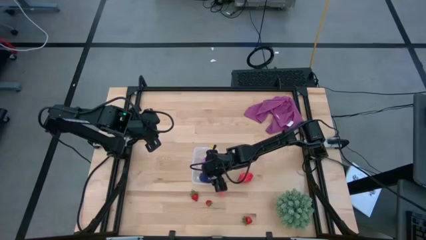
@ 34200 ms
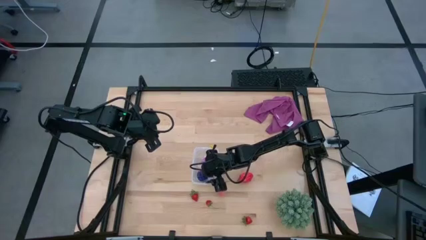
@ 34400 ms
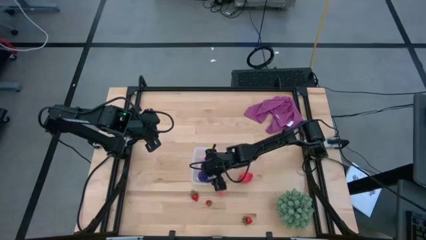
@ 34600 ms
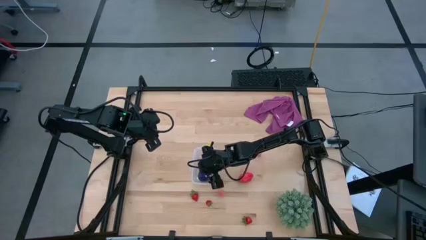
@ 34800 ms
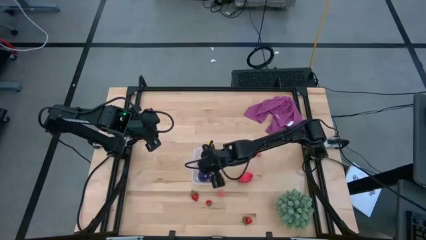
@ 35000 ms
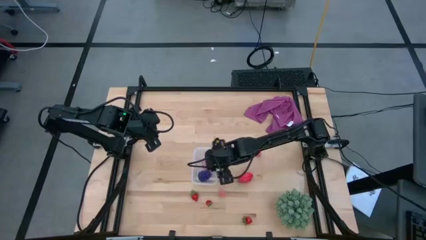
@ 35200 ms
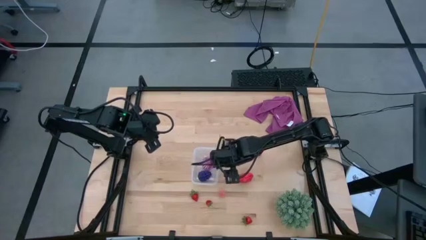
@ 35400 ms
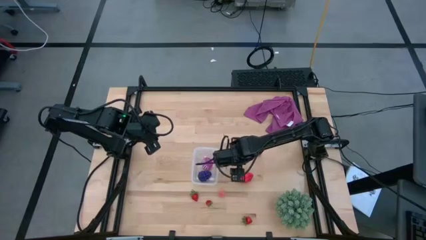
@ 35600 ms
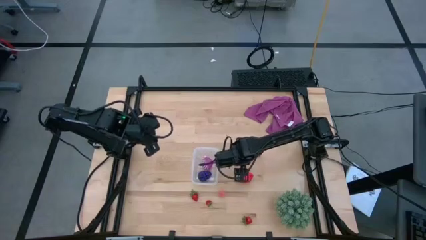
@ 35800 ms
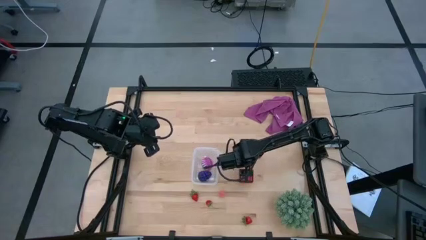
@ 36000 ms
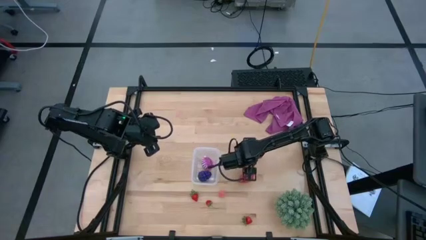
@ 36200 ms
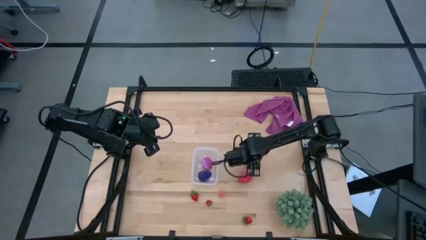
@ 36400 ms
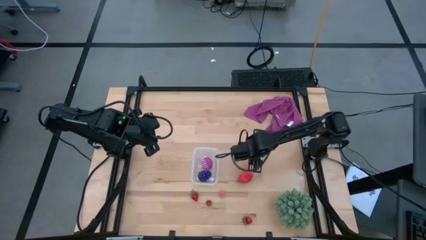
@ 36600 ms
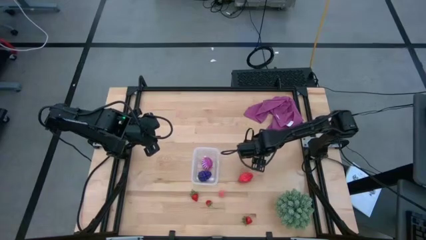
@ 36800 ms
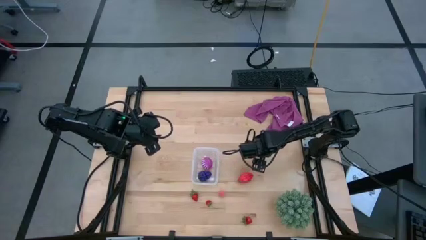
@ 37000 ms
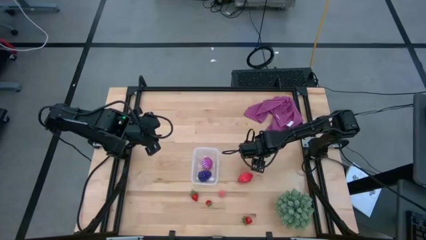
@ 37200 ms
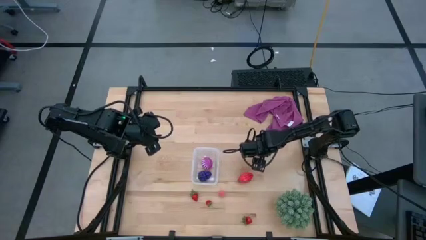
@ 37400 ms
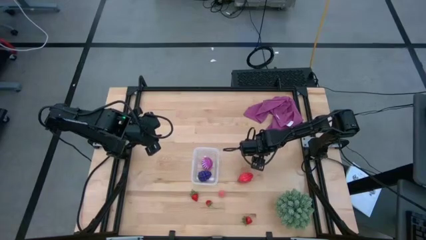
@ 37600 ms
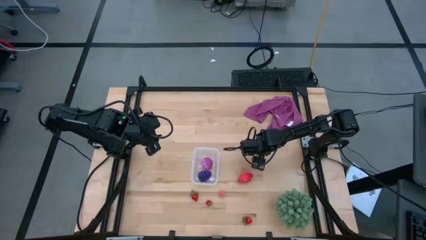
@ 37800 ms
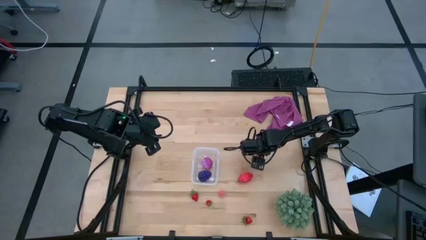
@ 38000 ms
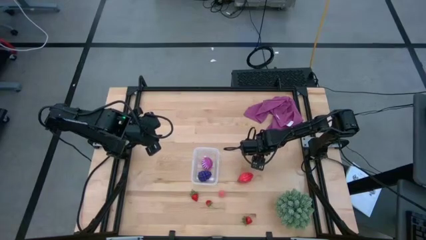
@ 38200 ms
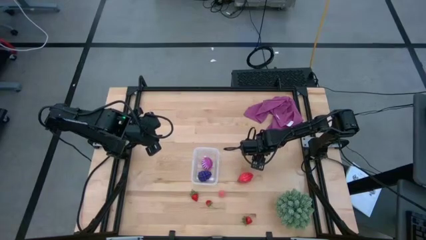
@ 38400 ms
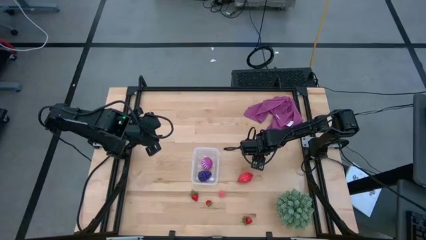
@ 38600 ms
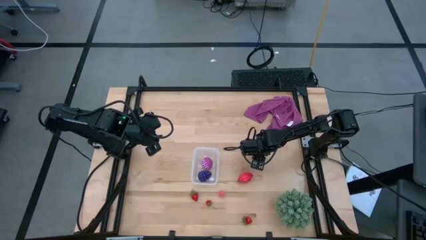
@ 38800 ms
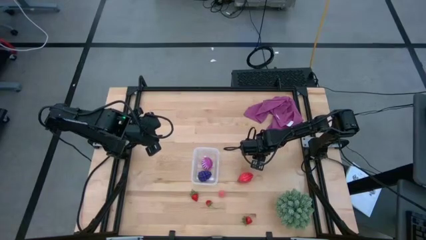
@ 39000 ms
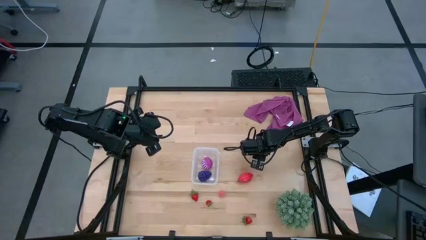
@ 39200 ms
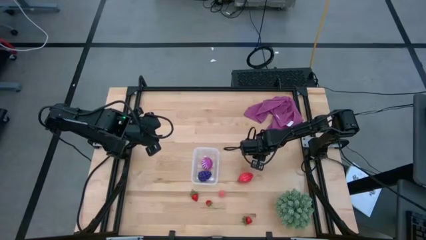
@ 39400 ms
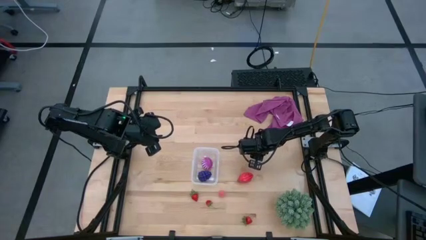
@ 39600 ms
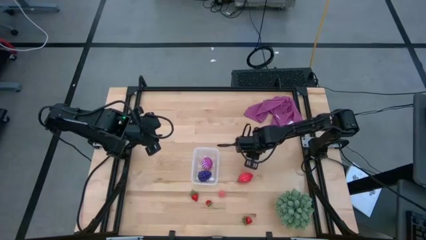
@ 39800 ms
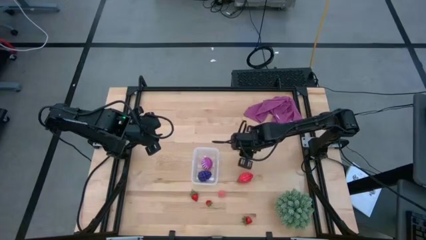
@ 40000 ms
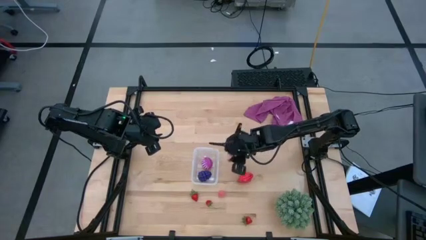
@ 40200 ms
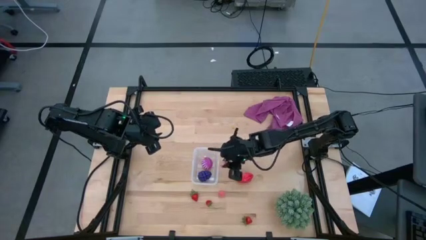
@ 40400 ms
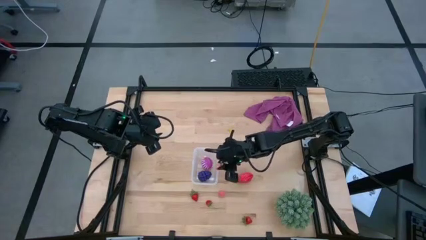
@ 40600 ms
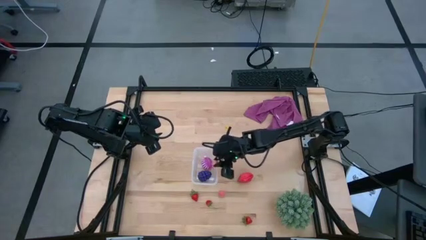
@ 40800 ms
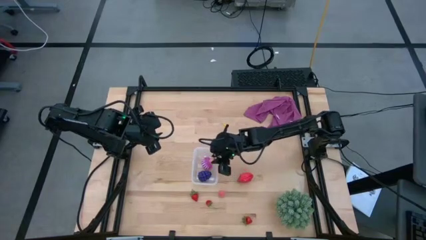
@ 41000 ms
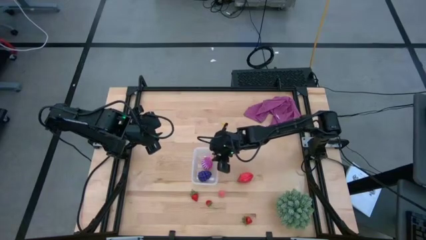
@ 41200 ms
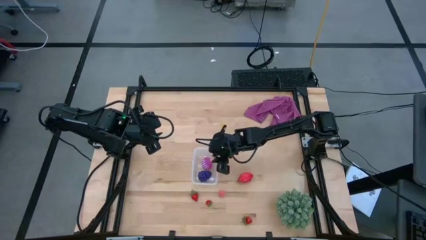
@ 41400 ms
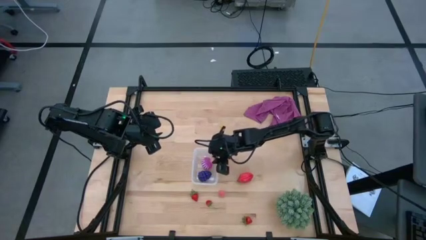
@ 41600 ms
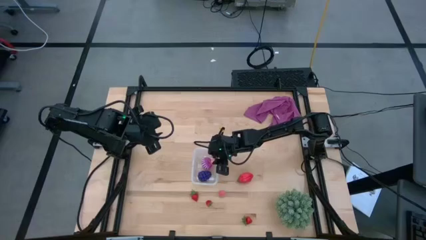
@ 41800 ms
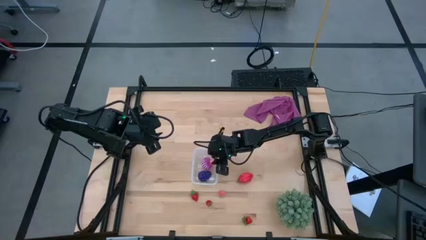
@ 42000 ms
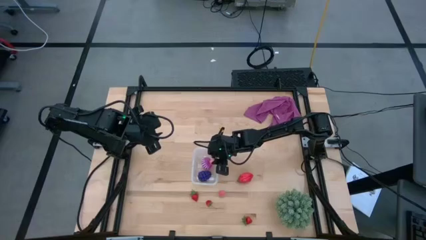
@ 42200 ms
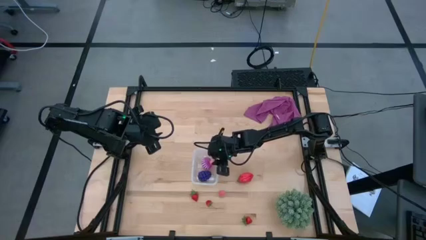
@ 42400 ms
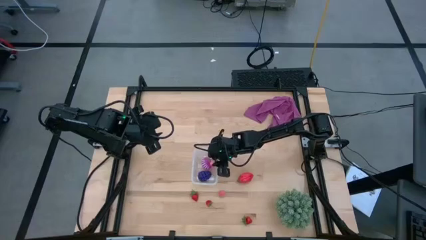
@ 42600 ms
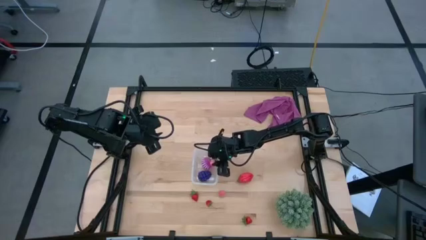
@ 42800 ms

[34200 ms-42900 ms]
Task: Pick and placing Produce into tupperware
Put the light orange top peach into the transparent bin
